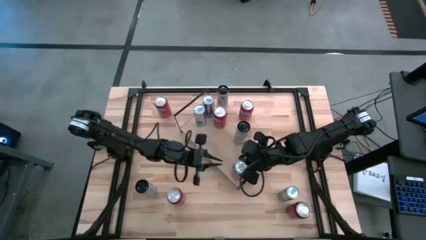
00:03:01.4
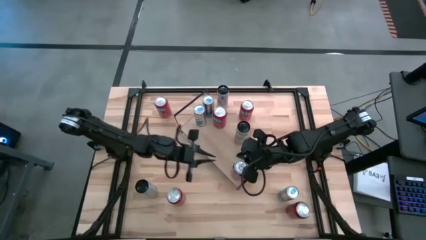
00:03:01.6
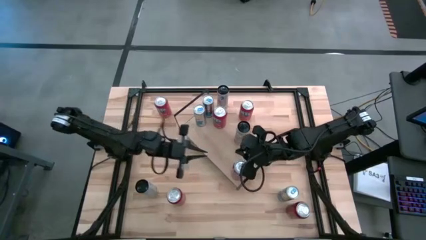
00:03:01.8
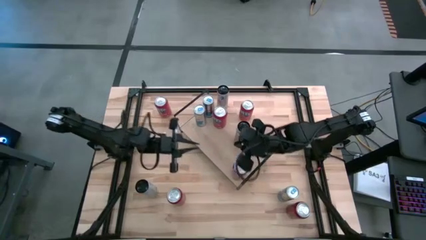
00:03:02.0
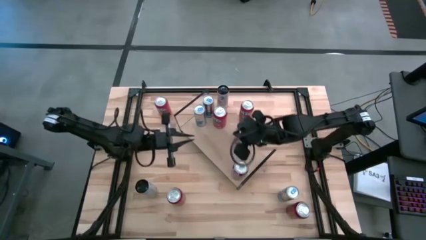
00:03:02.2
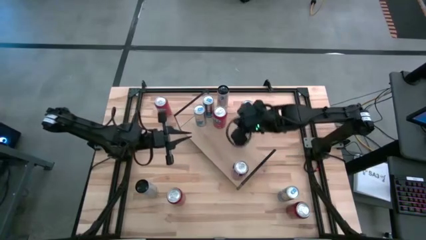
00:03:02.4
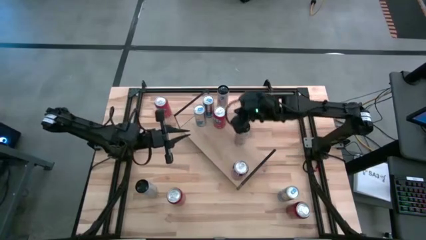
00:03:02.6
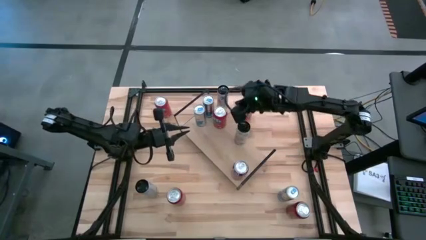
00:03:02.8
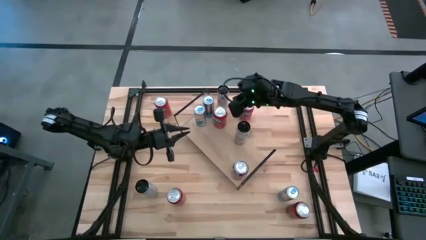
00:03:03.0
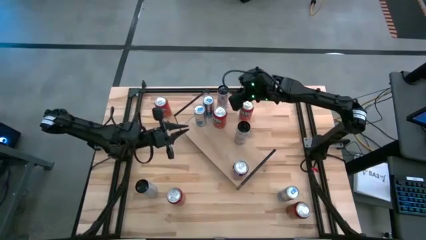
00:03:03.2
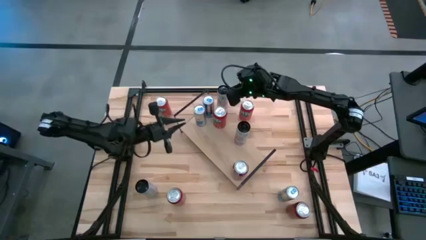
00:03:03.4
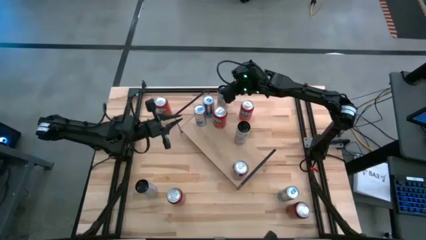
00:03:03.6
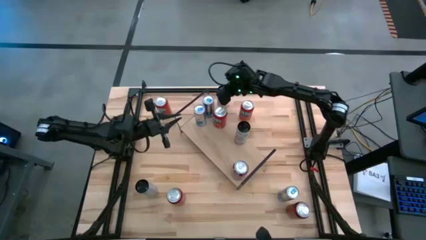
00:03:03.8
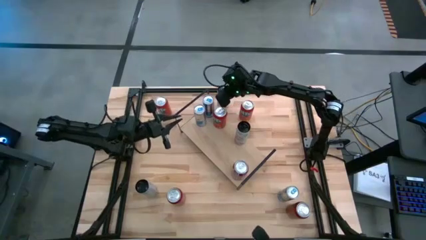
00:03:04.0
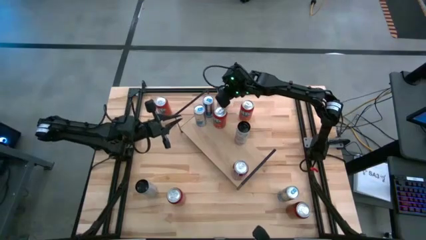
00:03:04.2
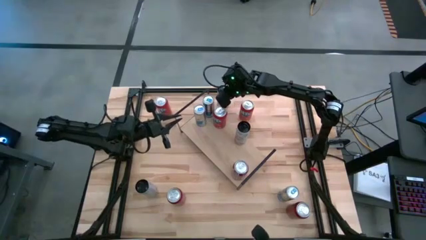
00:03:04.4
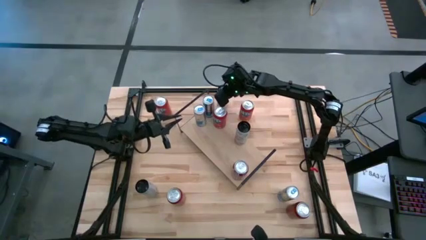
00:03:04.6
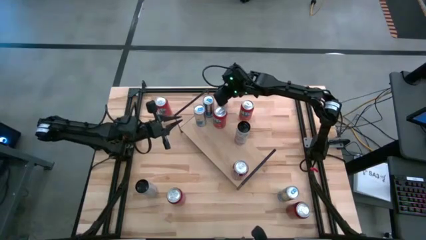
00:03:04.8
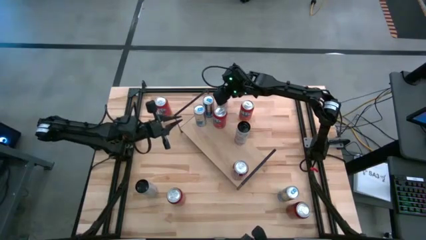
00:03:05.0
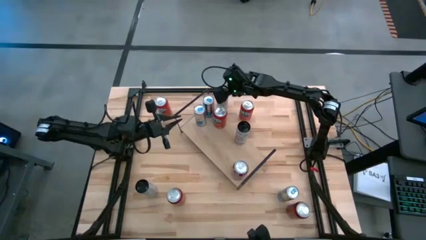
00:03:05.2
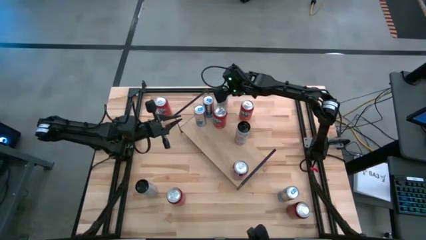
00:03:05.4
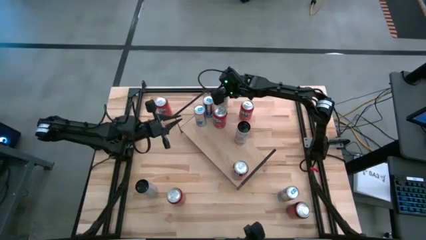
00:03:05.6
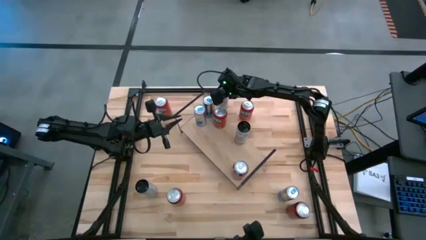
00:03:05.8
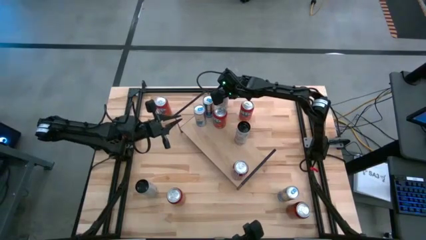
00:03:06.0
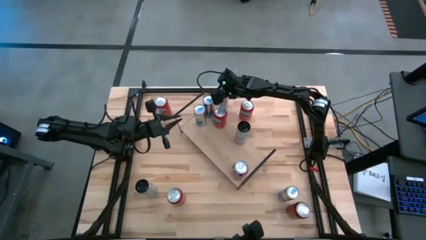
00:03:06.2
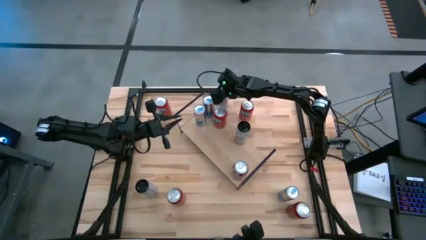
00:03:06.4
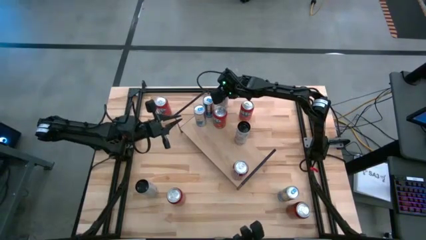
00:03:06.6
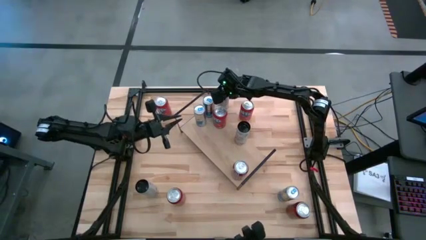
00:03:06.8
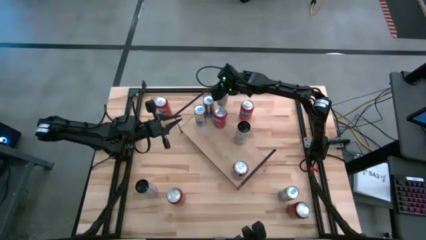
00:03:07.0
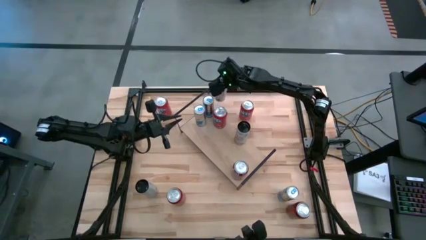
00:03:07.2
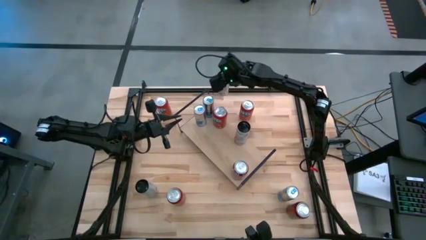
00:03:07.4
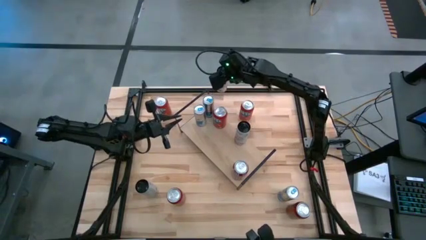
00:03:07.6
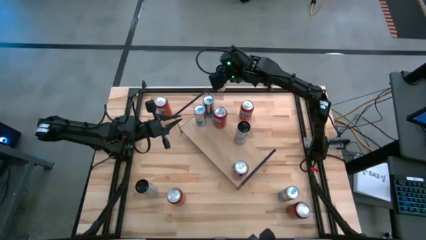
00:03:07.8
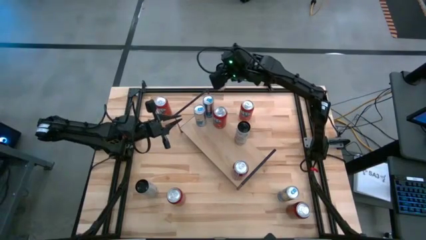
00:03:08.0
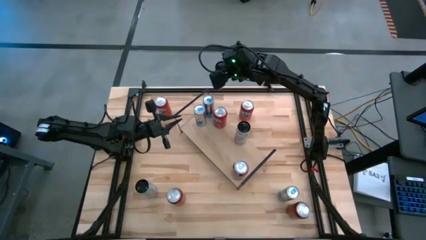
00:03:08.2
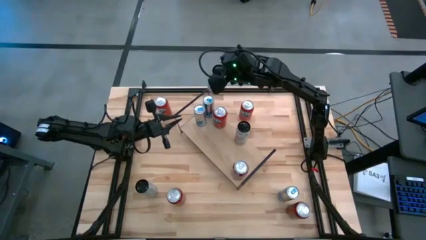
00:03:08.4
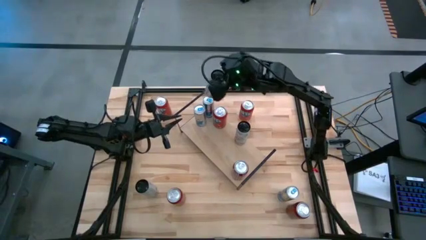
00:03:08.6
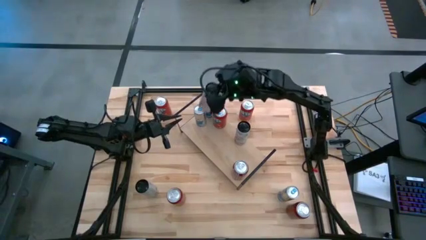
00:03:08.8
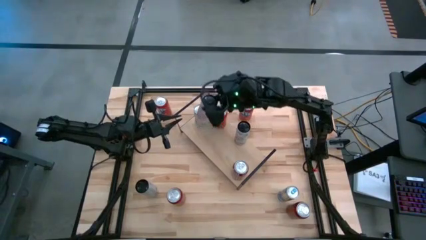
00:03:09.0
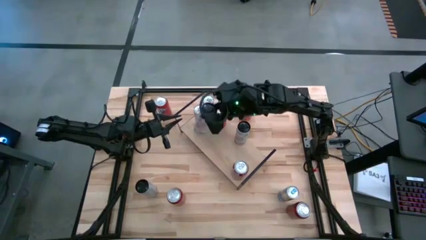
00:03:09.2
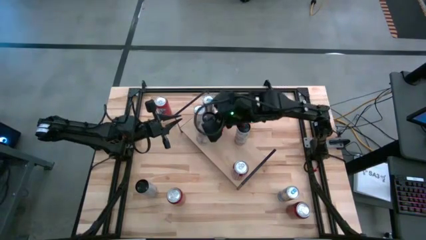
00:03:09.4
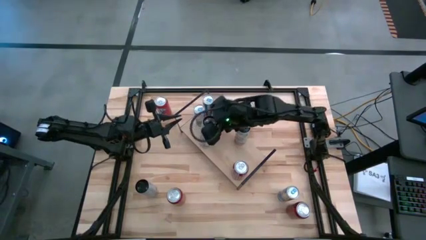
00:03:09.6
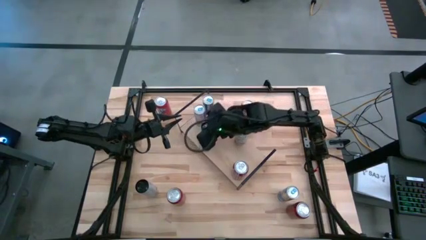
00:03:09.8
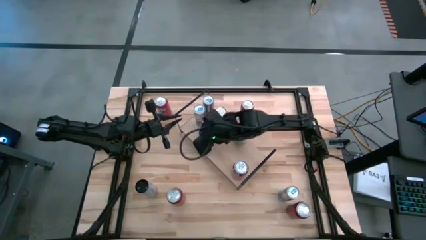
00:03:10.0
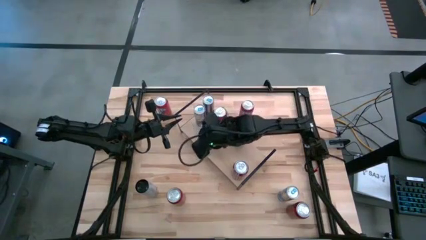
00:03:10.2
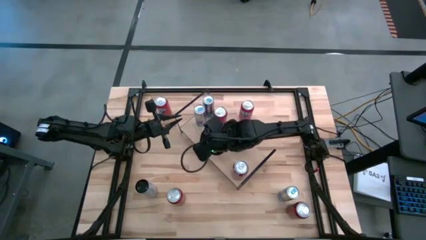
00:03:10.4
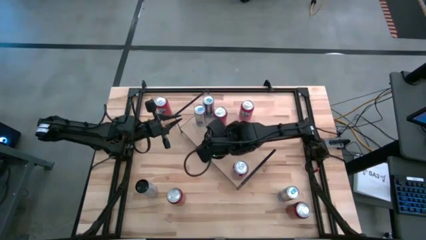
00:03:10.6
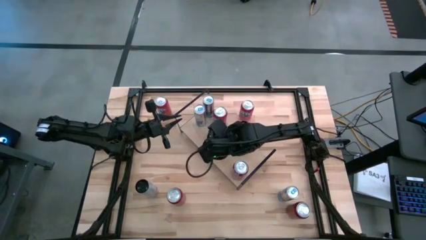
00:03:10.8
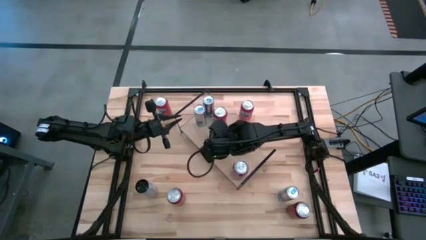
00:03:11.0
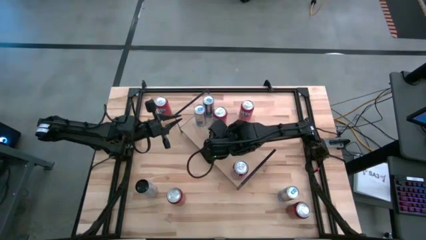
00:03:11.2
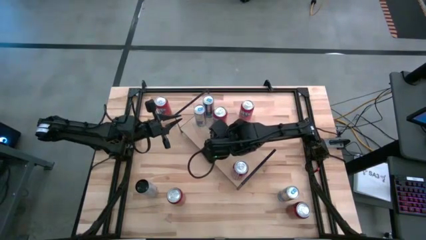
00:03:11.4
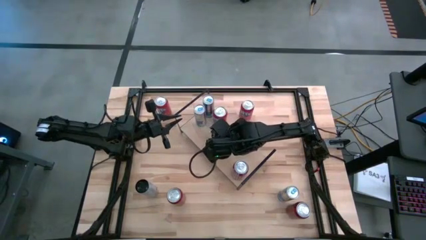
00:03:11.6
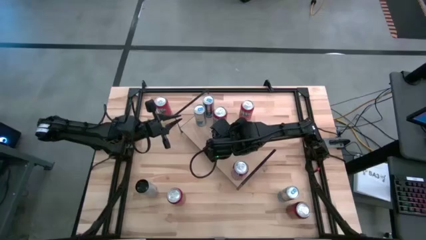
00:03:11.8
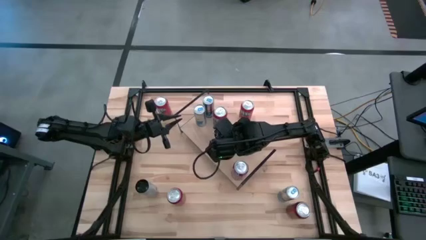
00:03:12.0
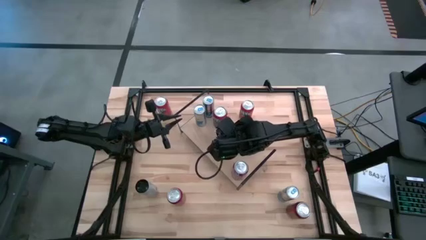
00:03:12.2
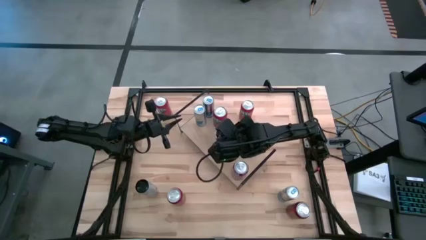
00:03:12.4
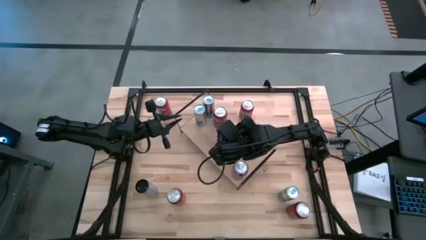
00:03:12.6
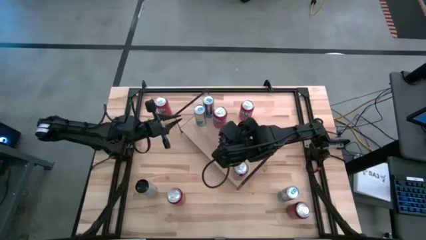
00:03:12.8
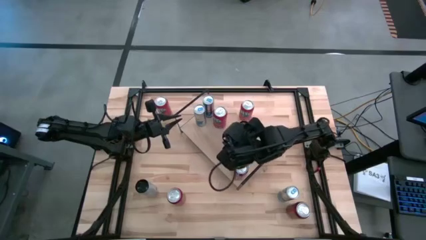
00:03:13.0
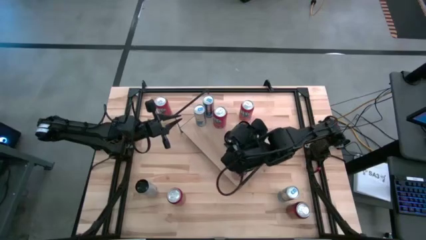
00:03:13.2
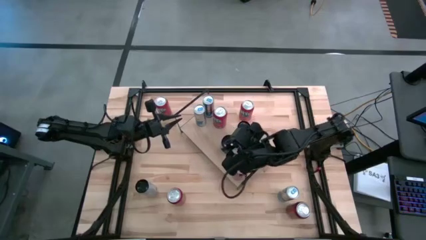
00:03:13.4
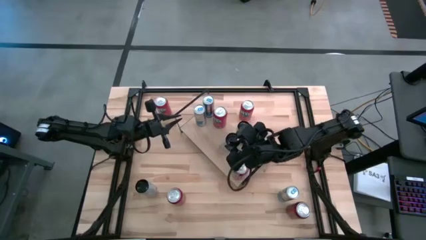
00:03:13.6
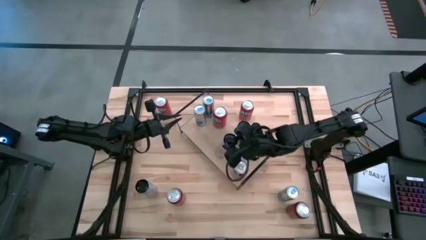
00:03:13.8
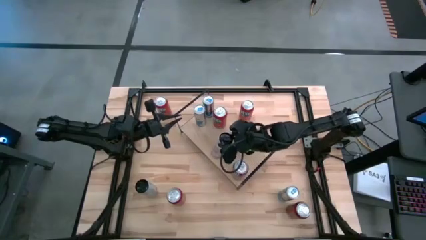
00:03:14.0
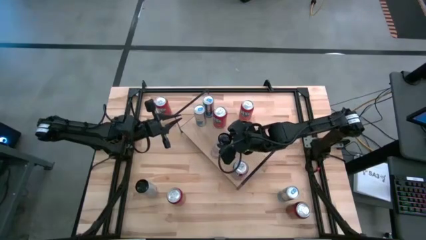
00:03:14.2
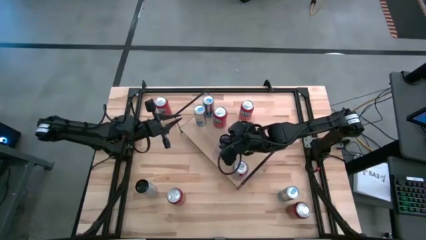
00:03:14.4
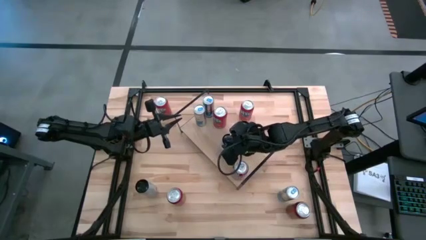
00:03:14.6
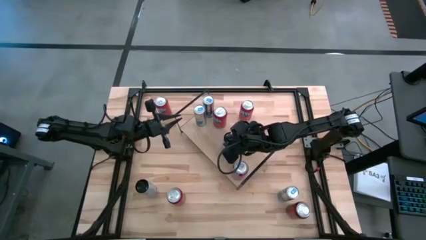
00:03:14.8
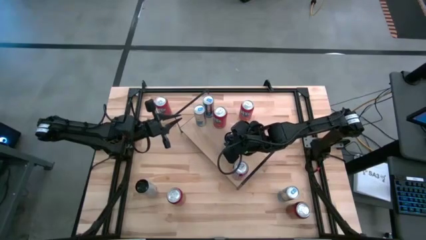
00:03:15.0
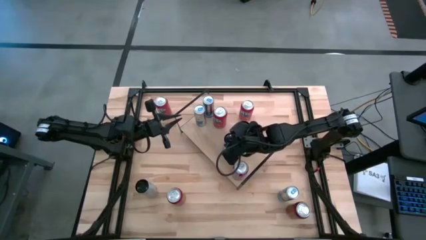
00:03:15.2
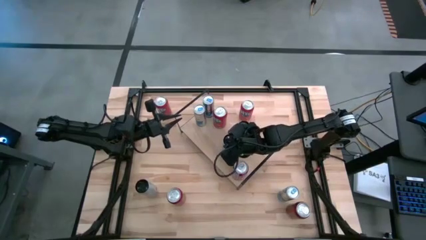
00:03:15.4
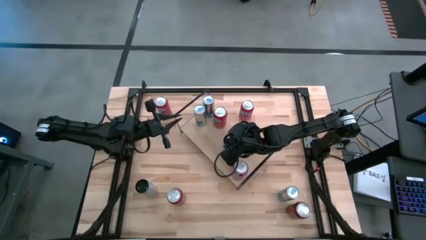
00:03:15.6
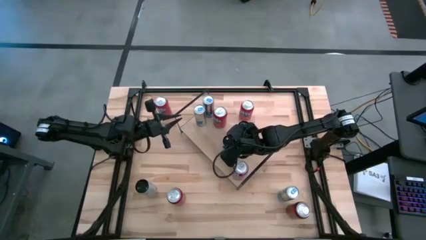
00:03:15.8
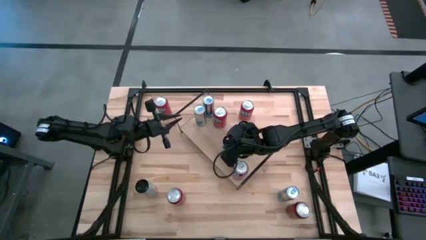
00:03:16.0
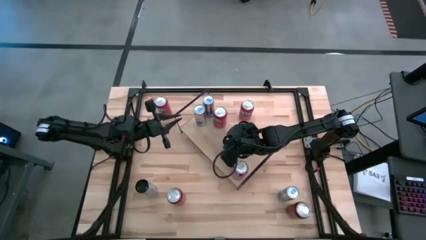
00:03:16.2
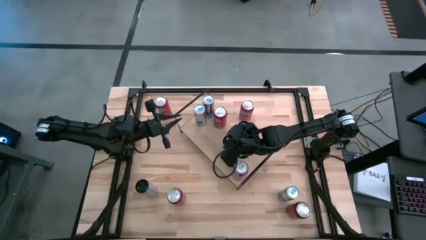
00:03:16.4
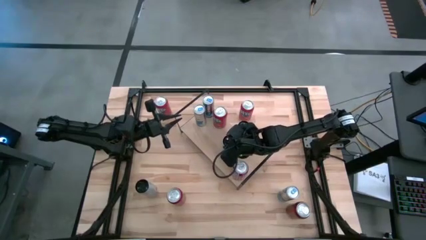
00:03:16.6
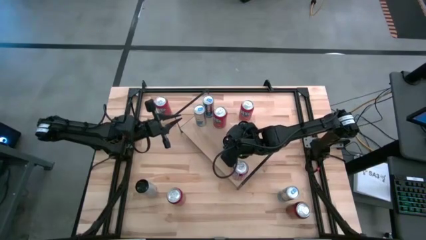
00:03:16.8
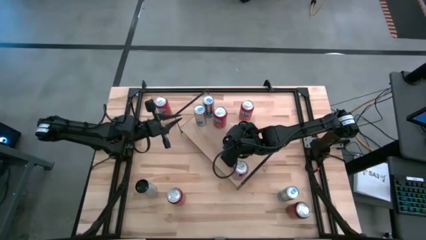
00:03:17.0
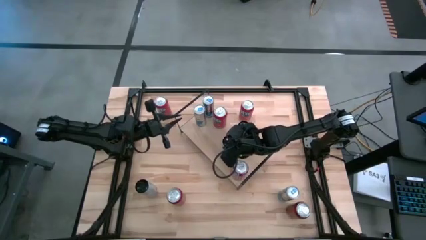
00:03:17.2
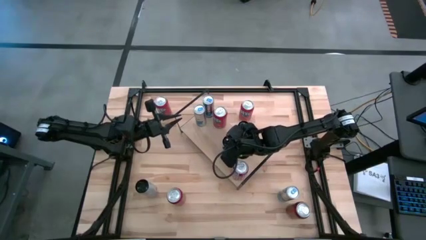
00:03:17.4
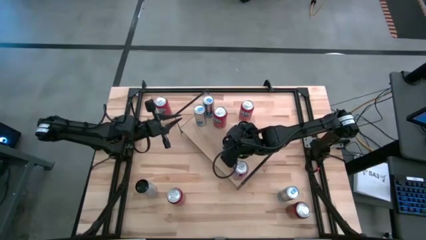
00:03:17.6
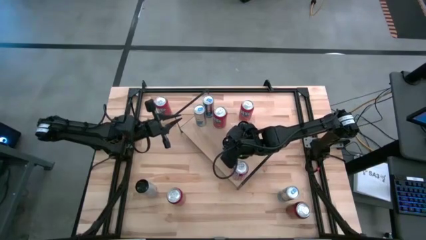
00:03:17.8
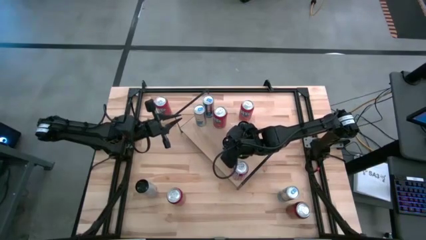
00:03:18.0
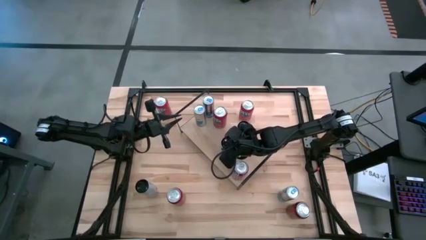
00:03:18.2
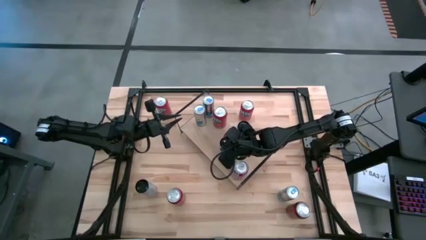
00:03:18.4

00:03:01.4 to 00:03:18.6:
Task: Place canned beverage on shelf
Put the top pink soda can on the shelf aligned with the pink soda can on the shelf
